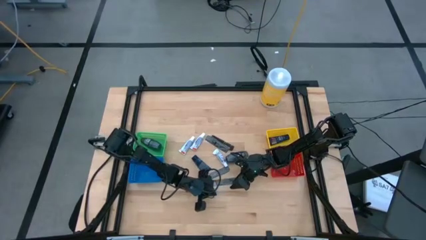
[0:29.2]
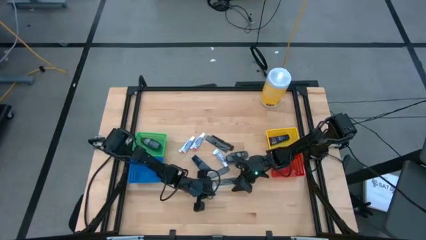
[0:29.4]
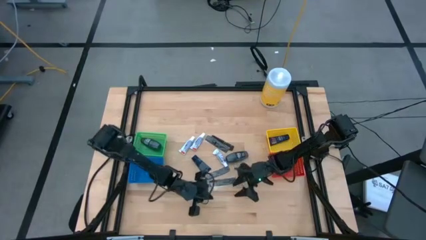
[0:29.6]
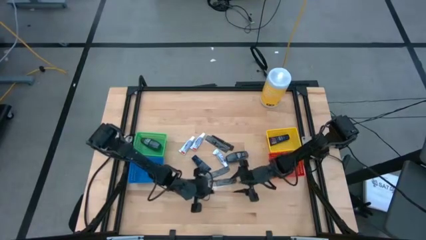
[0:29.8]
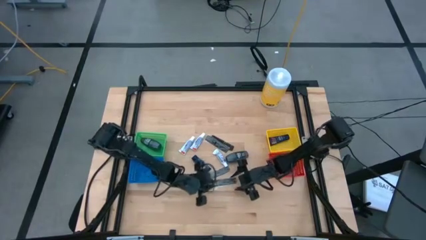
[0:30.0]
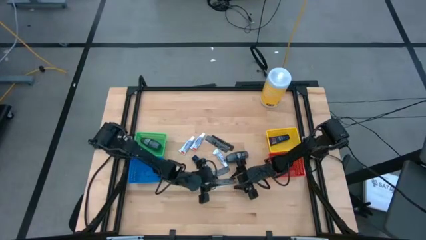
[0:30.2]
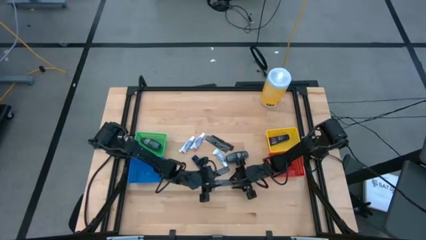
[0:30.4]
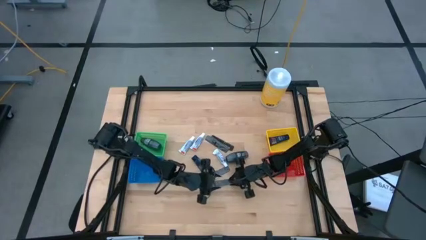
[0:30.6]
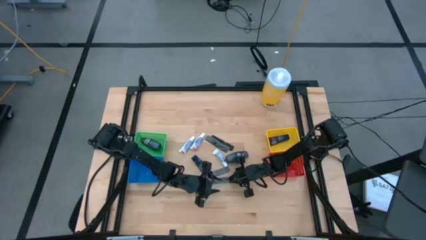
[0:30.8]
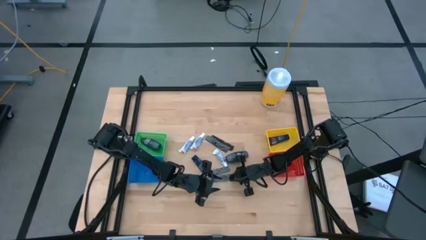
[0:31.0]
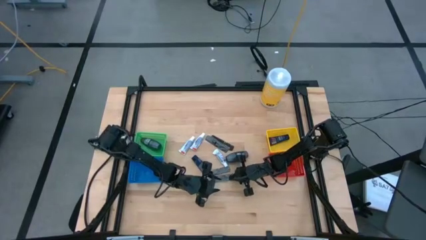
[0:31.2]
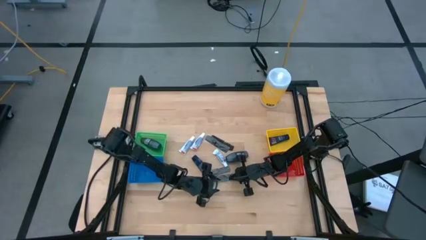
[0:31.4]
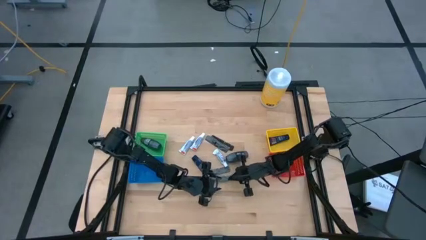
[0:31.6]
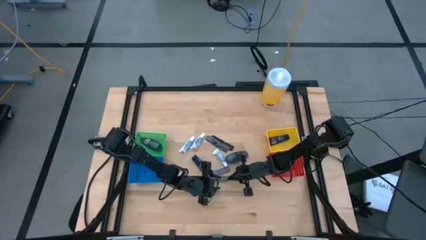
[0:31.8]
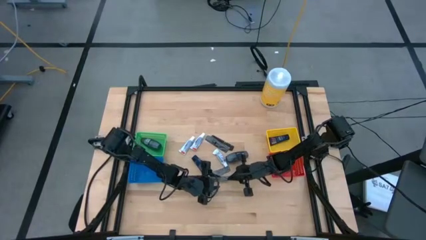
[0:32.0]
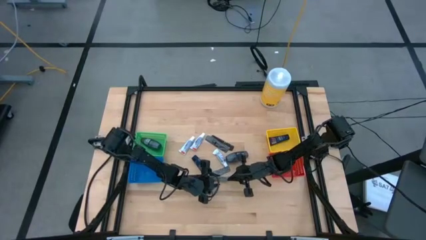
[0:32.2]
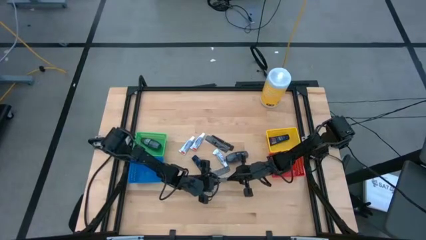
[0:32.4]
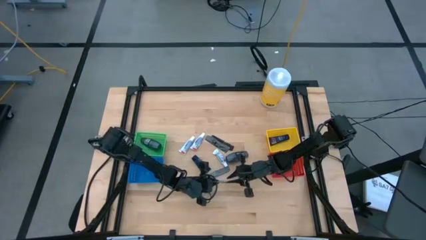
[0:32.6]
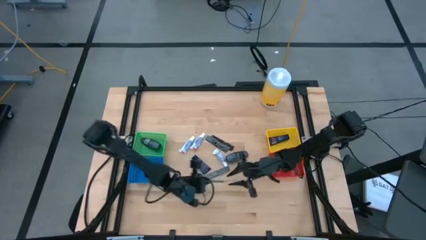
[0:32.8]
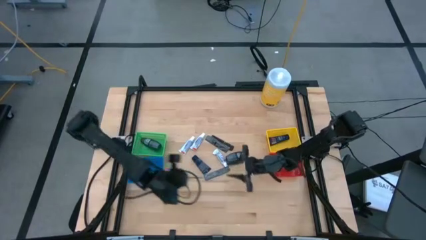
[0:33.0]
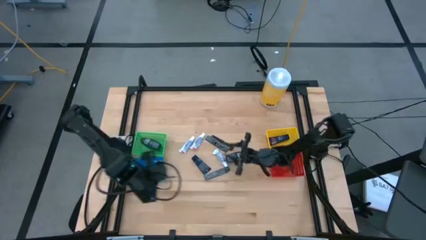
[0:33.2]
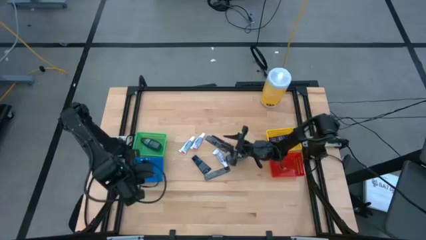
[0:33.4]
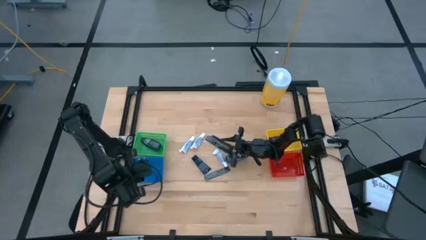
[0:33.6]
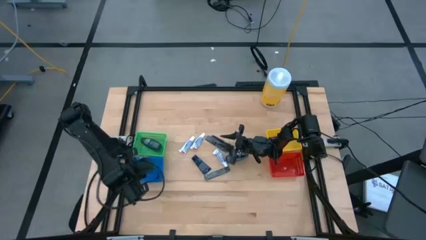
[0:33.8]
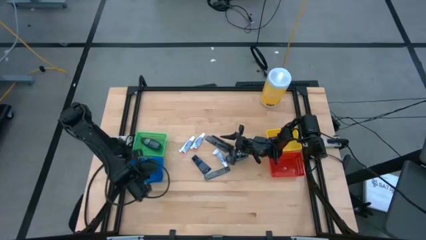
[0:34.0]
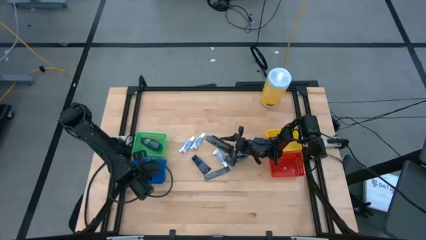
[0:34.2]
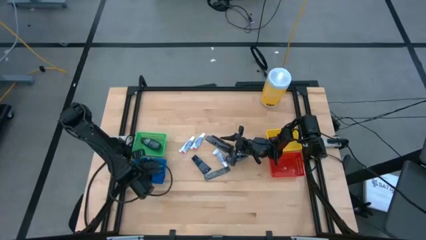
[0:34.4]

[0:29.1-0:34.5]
Task: Pick & Place Travel size toiletries
Put the black comb into the blue bin

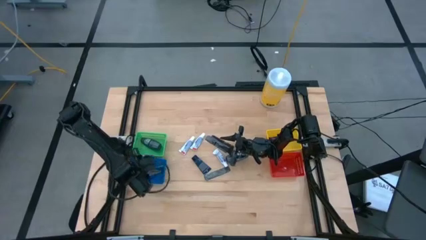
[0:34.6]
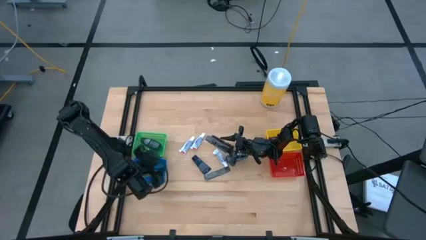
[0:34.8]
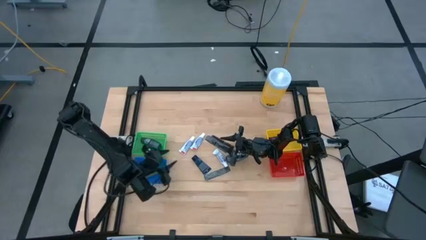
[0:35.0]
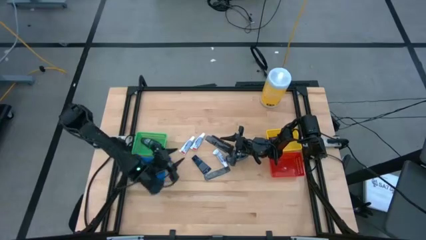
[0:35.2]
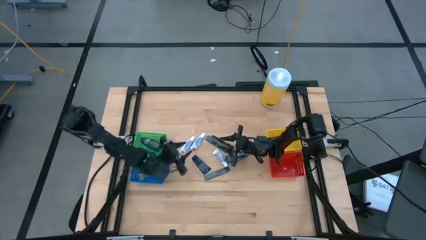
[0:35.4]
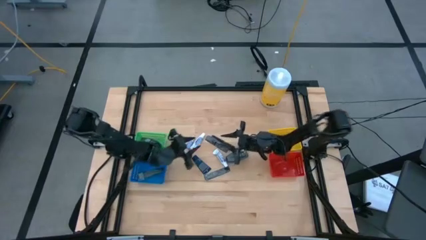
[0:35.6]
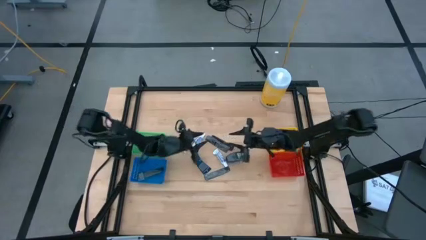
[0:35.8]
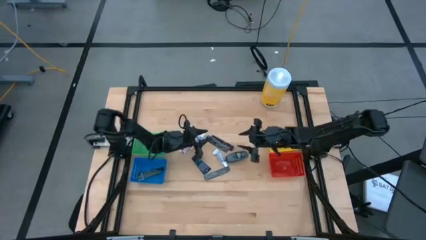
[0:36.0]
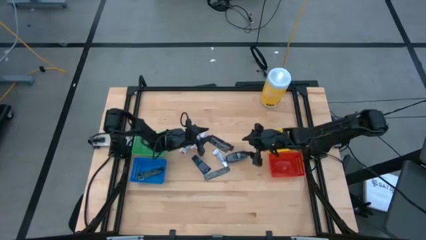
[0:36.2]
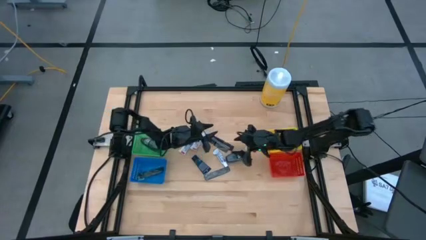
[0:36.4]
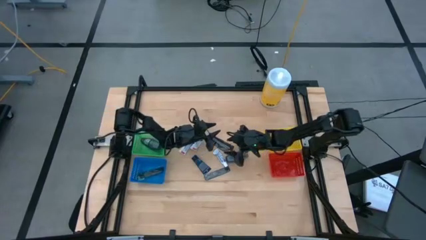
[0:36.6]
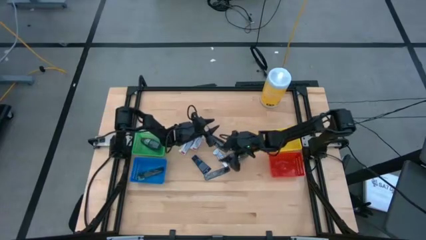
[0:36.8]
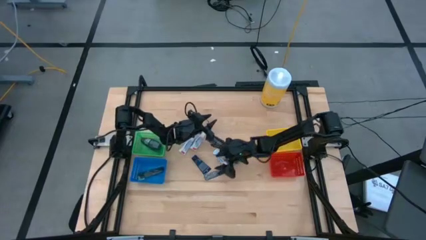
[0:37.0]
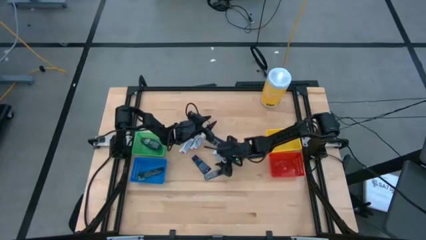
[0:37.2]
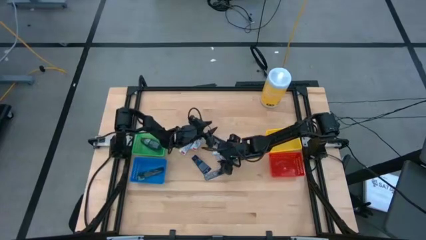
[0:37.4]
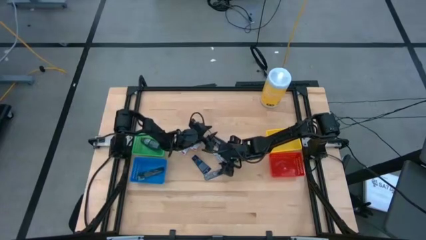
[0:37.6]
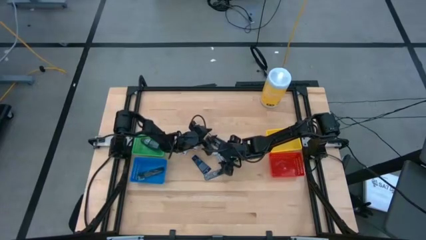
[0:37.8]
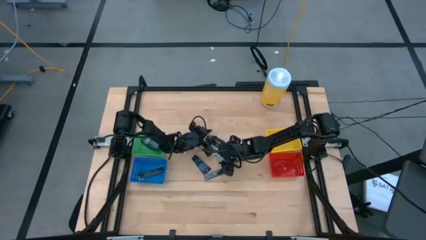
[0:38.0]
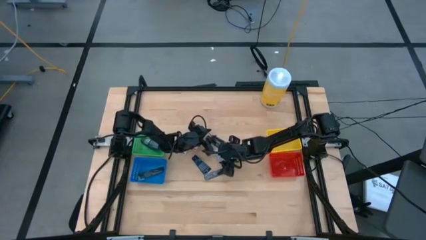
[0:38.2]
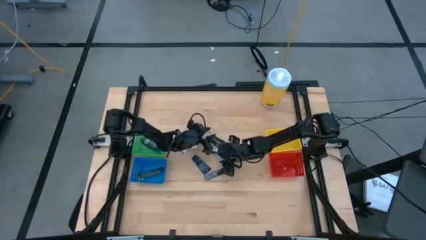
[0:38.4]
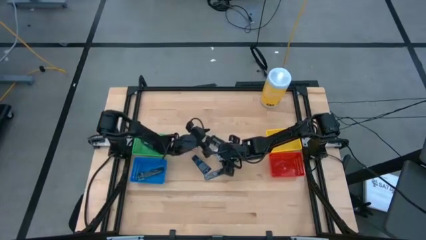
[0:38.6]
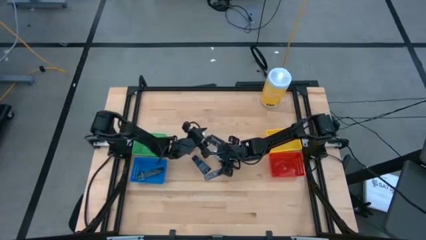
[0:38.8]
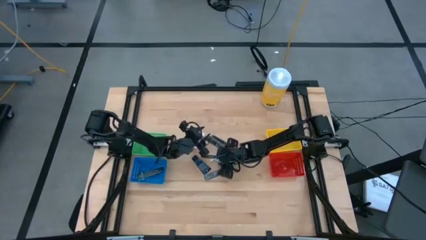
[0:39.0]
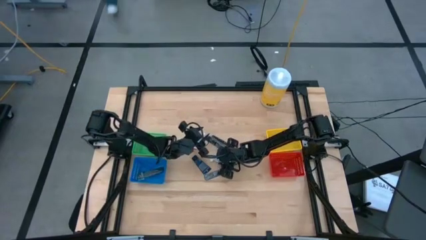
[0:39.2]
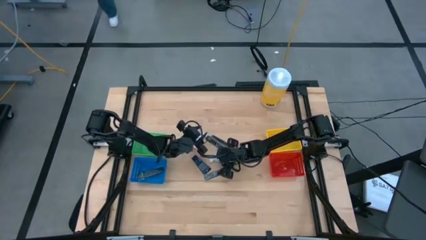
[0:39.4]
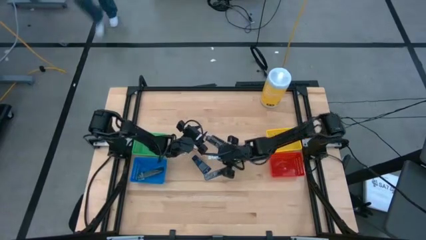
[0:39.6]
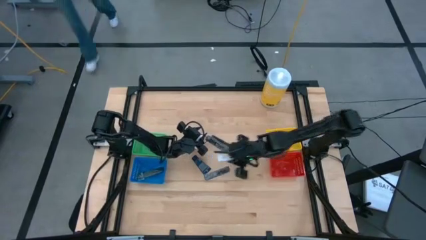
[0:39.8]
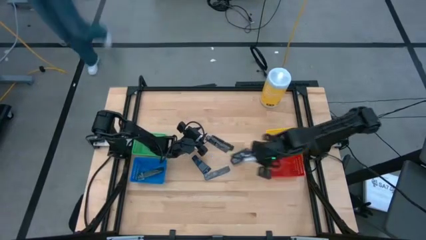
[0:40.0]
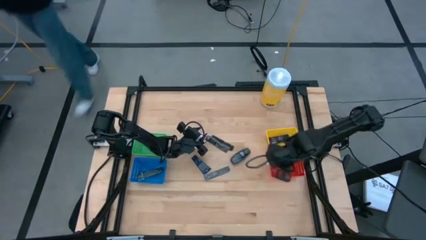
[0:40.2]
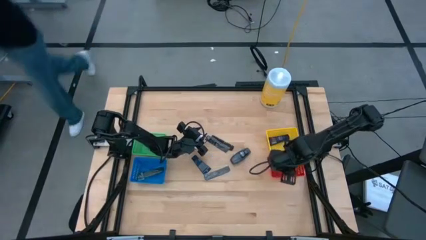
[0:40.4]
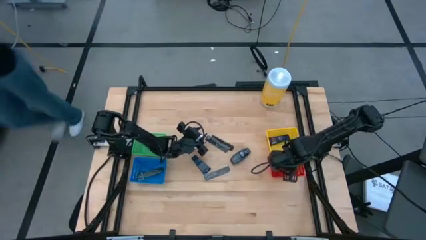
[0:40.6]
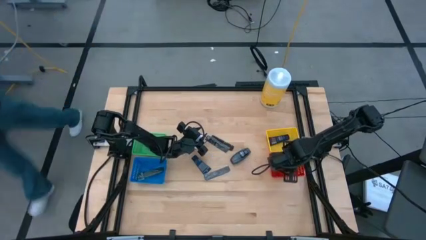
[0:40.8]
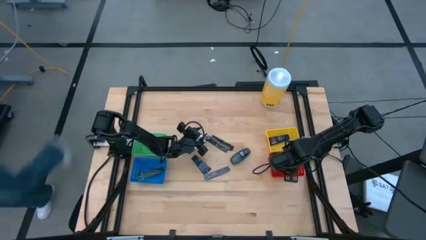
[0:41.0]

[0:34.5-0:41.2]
Put the white toothpaste into the red bin

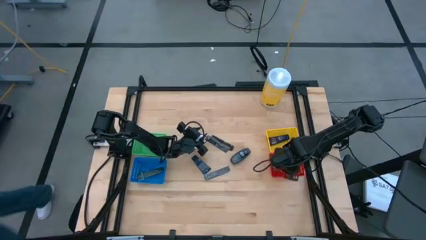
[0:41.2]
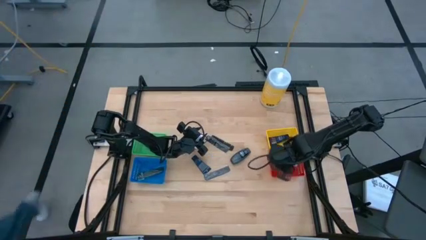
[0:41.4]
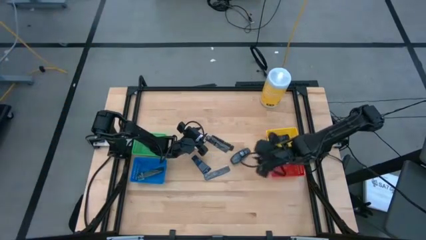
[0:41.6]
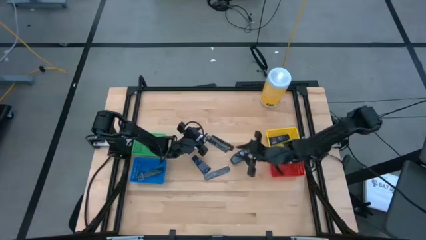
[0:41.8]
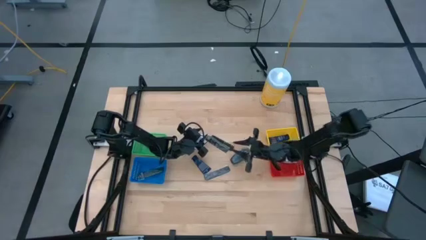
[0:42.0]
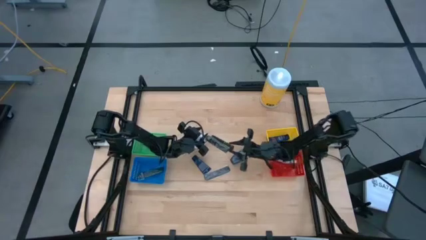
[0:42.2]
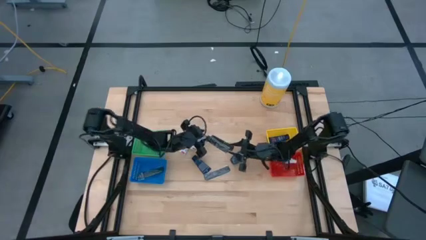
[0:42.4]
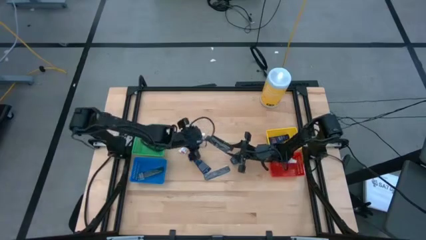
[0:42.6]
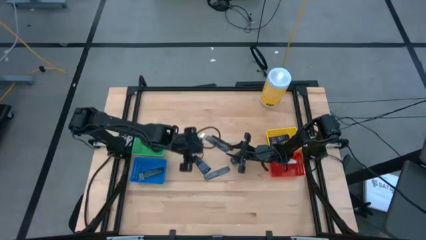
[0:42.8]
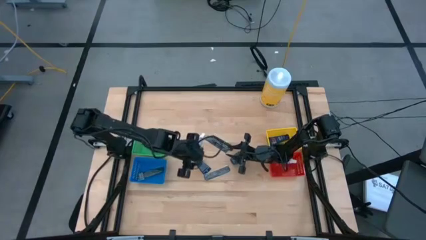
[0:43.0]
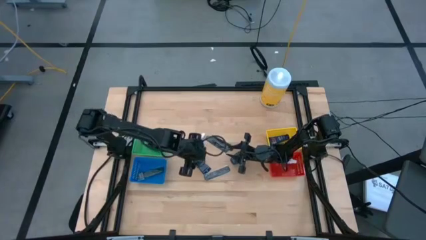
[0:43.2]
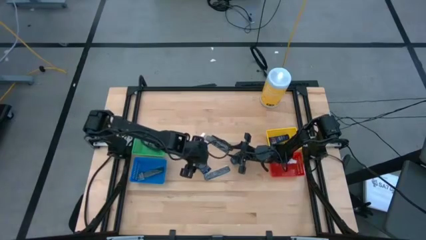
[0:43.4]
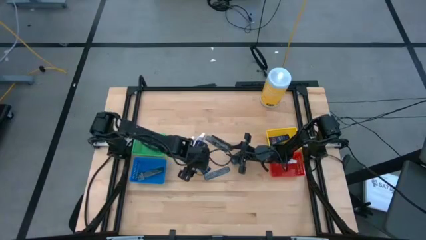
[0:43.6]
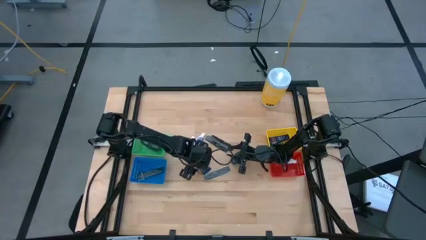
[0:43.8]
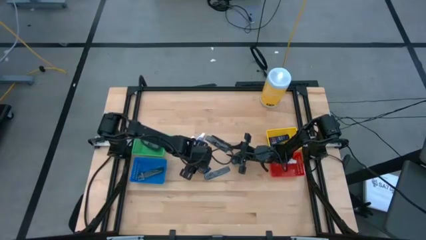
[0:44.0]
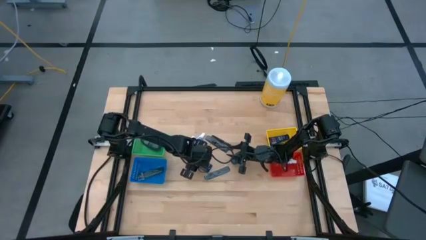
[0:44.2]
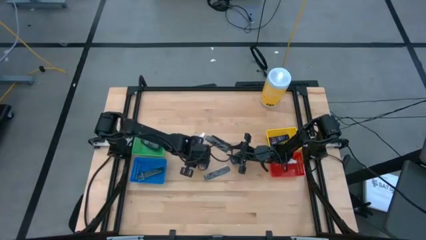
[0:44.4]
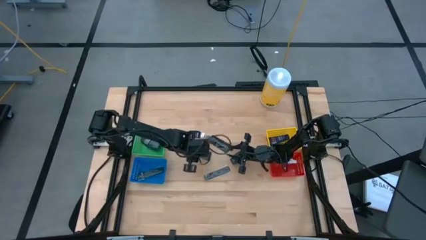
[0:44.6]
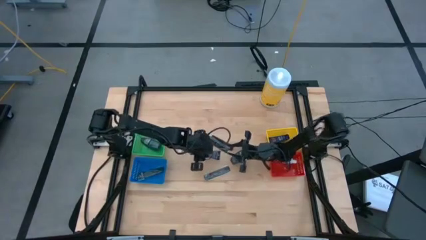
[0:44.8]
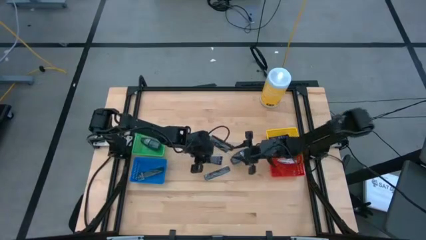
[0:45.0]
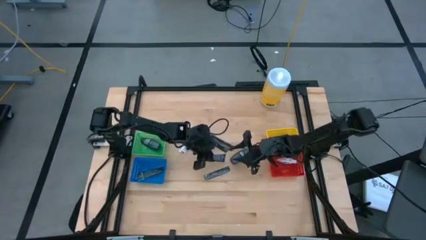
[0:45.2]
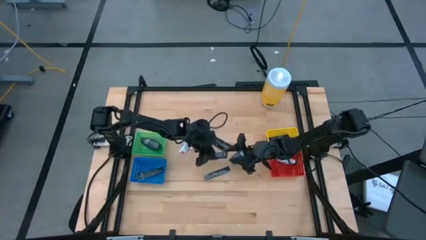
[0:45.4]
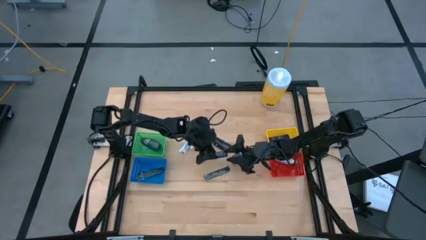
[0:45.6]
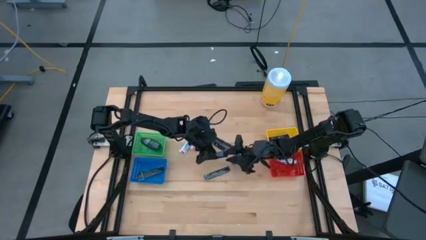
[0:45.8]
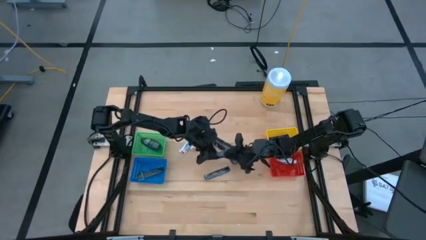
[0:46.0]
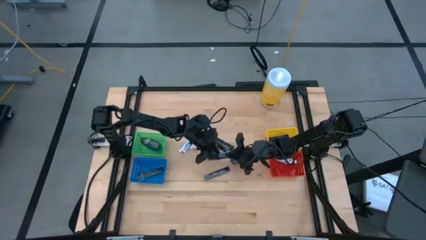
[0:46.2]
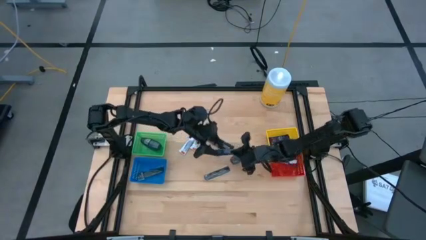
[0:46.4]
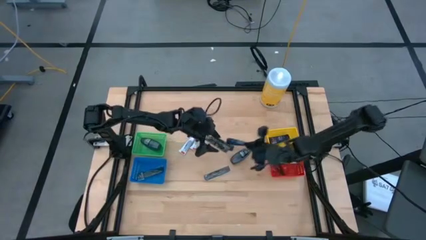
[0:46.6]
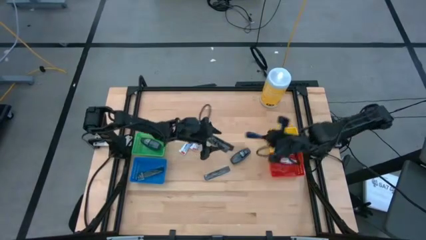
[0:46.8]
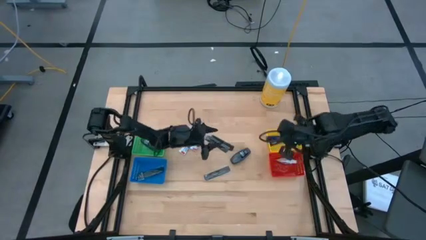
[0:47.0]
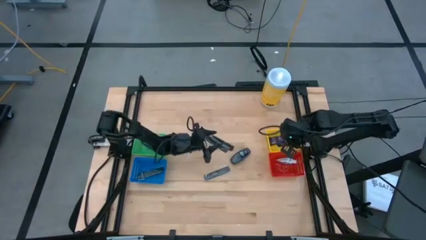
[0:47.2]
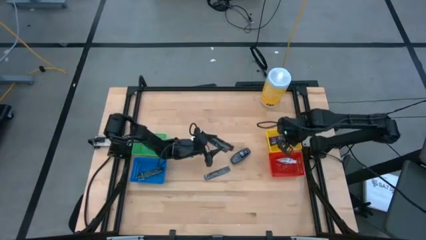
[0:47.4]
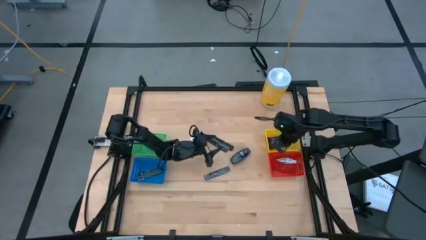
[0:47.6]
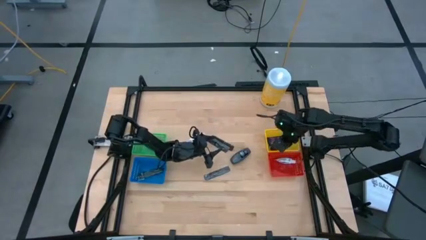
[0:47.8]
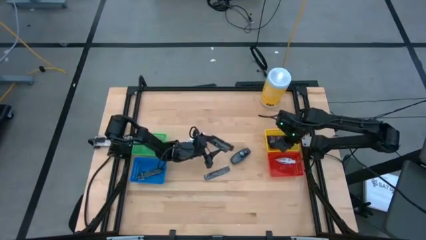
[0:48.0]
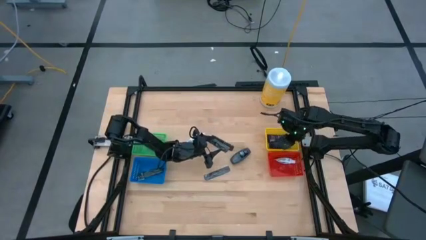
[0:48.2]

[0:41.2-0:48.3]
Put the blue shave cream into the yellow bin
